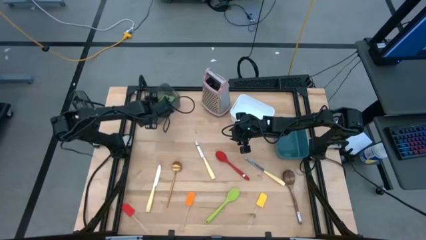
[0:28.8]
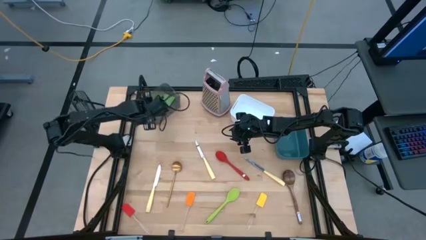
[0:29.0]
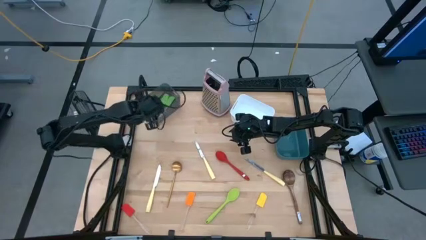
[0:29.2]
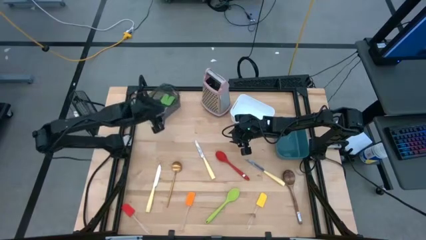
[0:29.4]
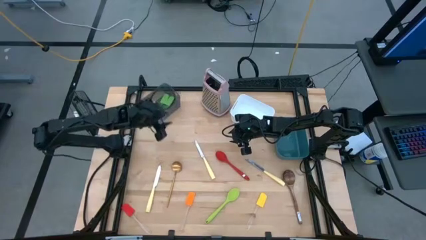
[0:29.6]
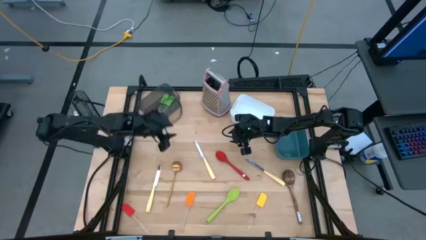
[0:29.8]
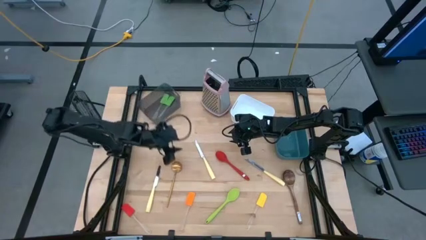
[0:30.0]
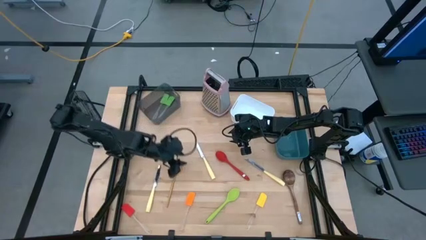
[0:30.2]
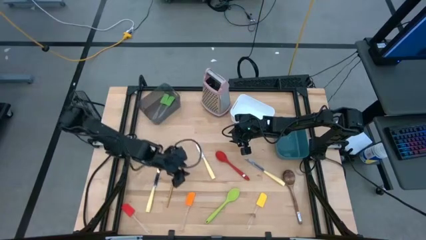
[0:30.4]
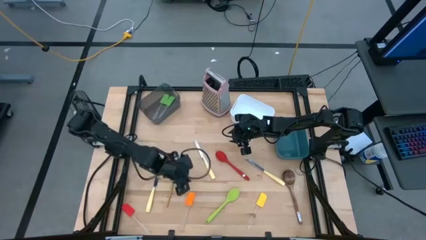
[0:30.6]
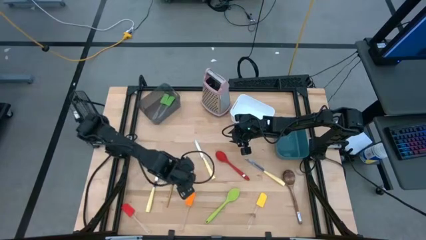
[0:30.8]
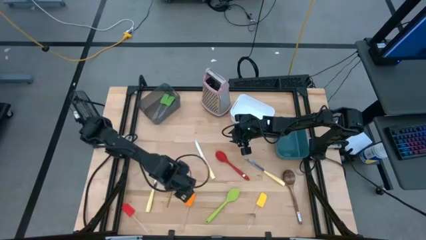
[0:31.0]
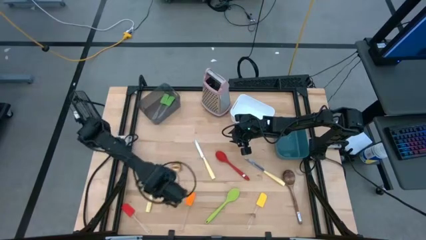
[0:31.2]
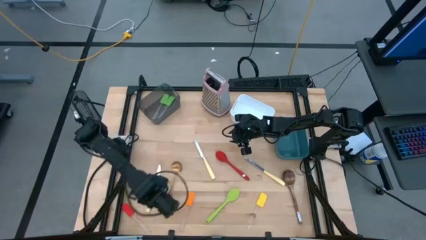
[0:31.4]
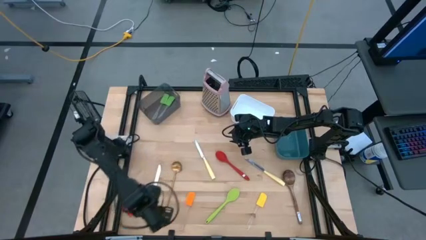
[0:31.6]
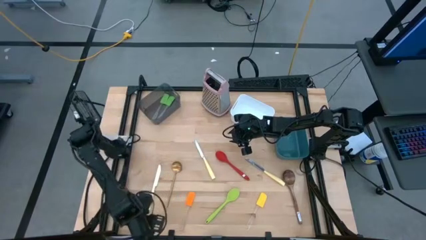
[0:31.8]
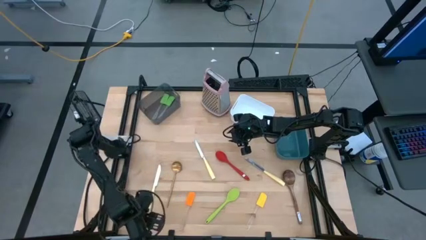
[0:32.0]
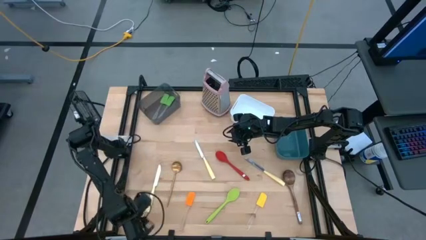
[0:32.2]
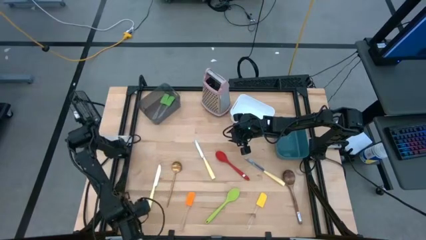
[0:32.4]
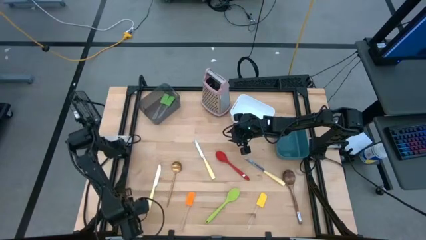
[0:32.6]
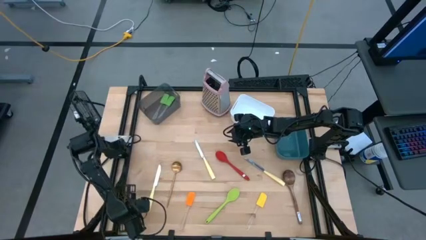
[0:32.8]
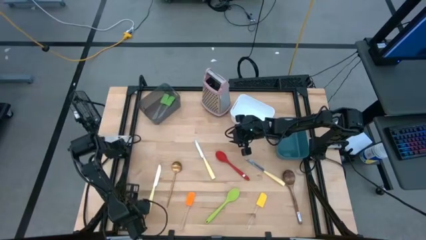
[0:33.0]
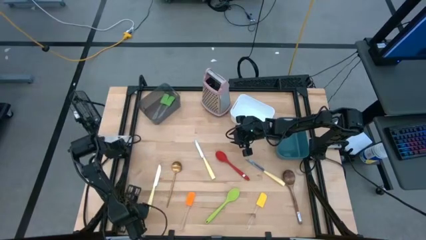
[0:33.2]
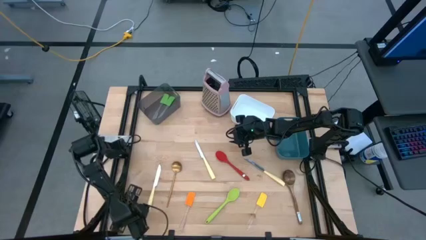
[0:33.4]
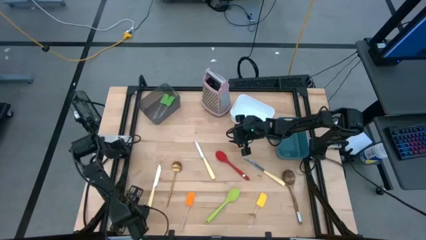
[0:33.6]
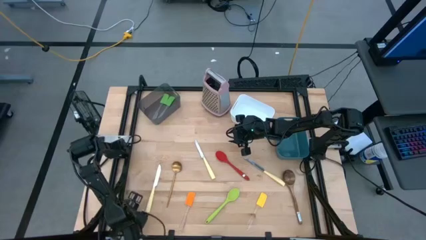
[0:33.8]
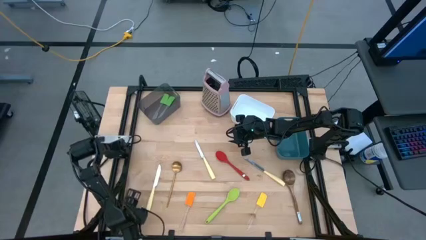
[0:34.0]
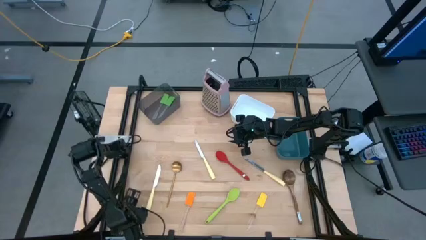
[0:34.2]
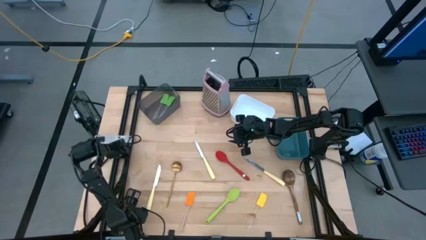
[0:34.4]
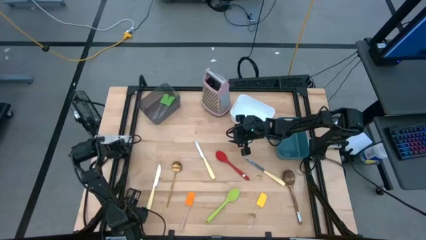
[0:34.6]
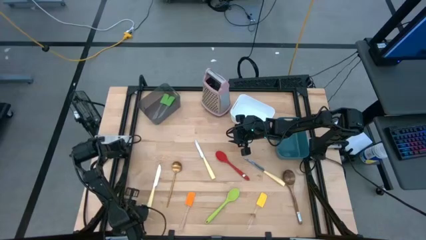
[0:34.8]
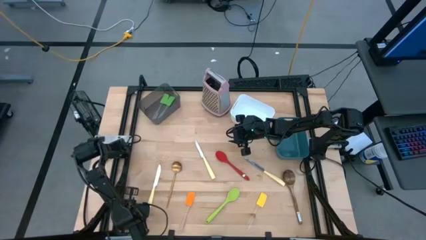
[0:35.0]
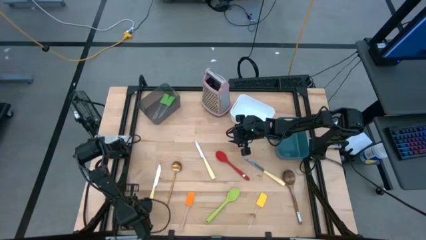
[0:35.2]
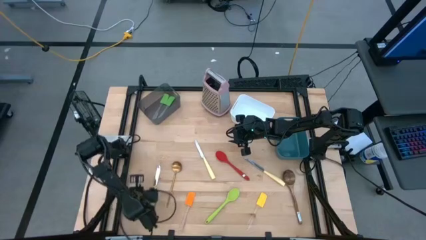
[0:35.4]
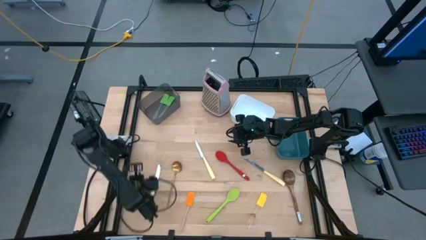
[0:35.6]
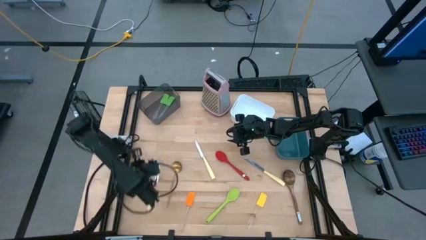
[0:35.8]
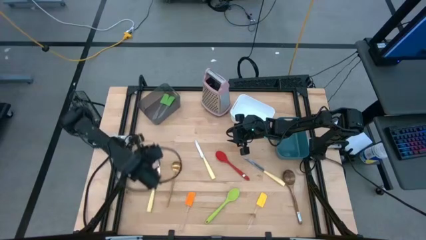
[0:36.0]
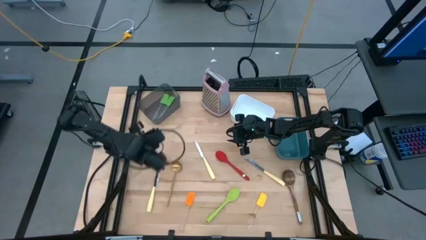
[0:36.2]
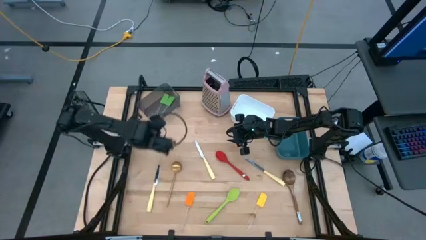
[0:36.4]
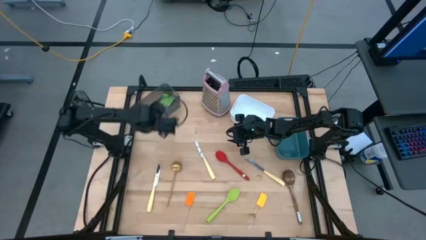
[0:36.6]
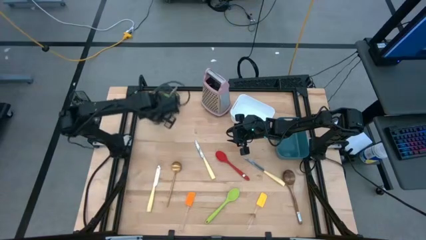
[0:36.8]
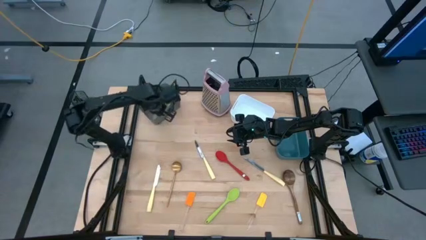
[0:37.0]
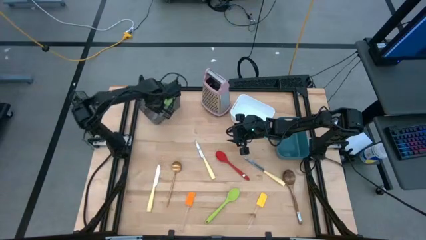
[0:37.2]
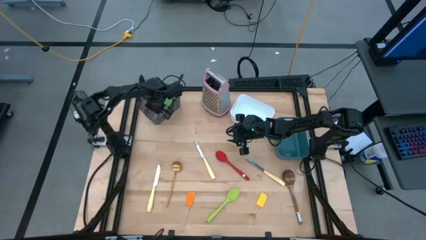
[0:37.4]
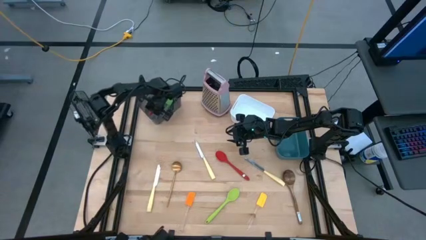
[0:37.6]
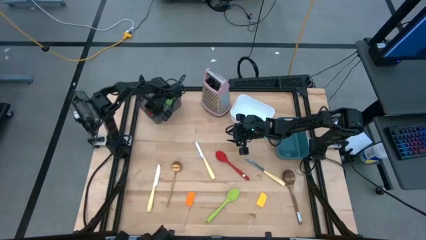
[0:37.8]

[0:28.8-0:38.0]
Task: Pick & Place Kitchen Items
Put the red spatula into the black bin

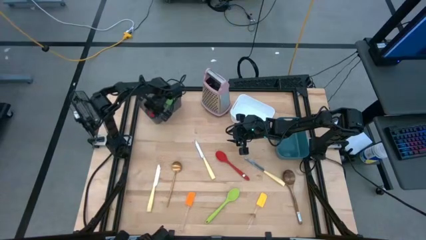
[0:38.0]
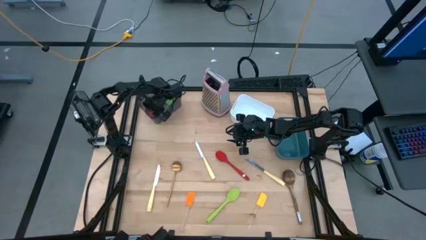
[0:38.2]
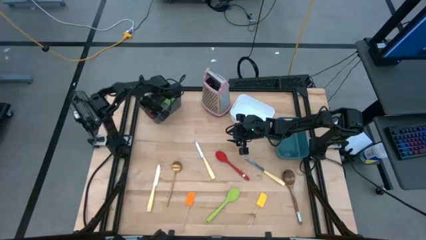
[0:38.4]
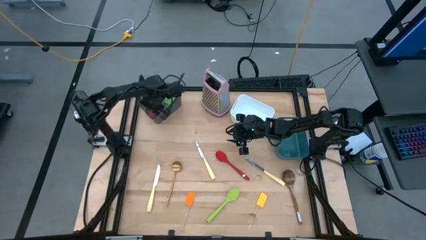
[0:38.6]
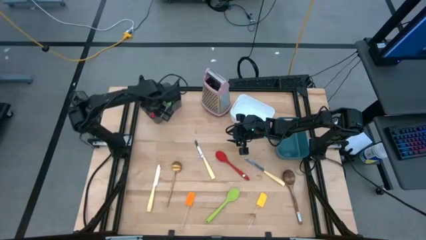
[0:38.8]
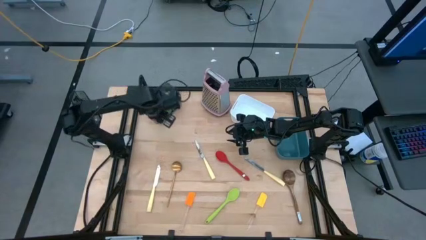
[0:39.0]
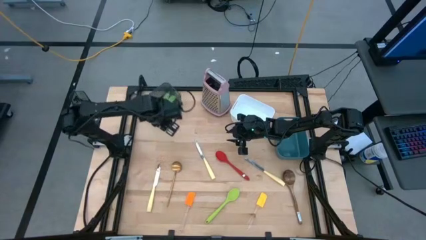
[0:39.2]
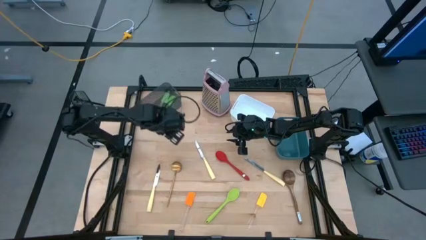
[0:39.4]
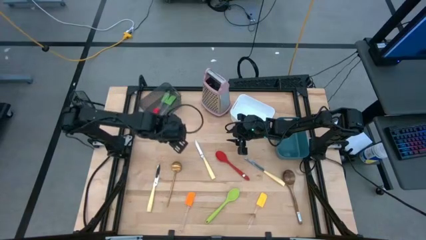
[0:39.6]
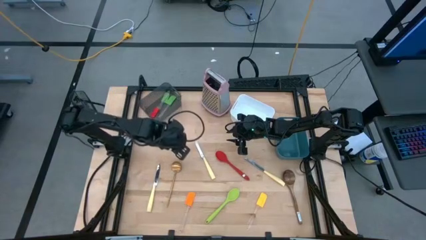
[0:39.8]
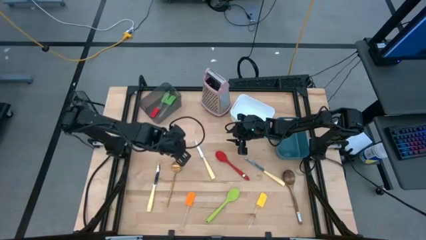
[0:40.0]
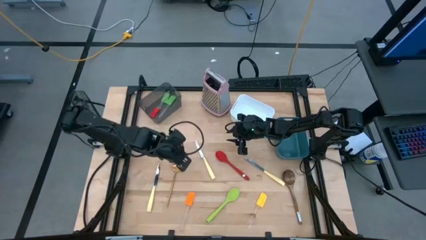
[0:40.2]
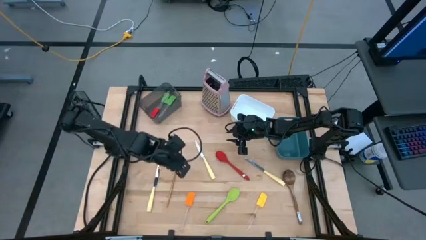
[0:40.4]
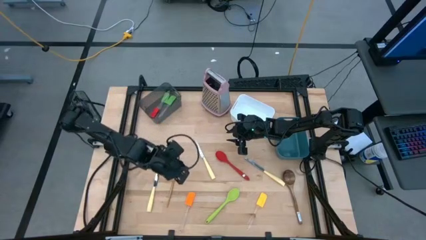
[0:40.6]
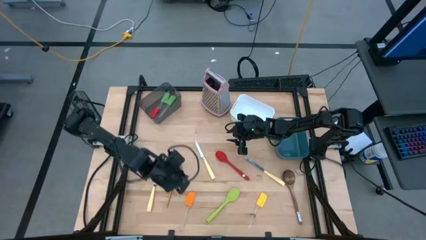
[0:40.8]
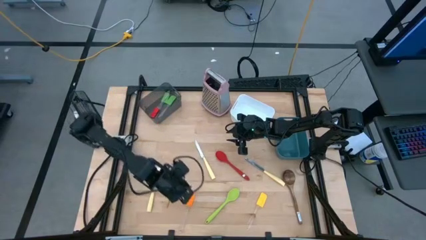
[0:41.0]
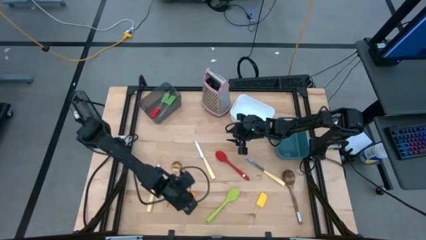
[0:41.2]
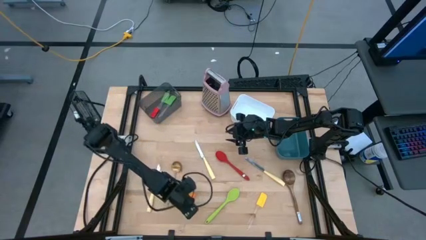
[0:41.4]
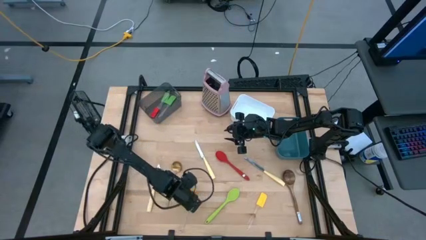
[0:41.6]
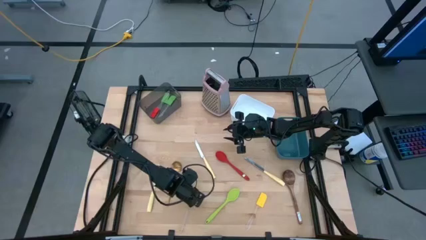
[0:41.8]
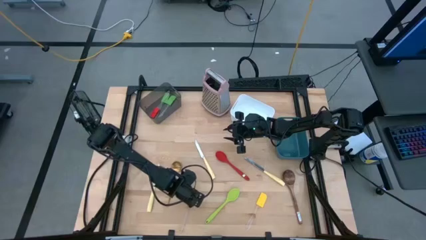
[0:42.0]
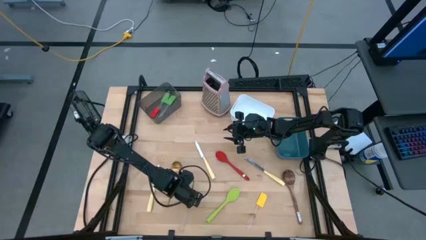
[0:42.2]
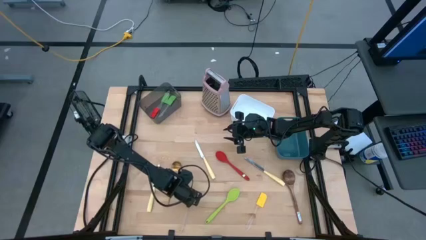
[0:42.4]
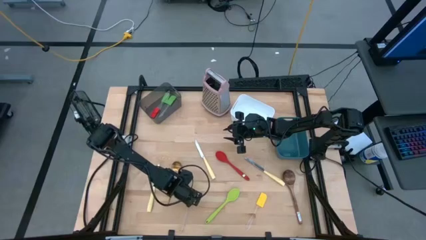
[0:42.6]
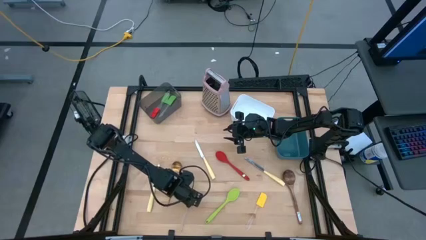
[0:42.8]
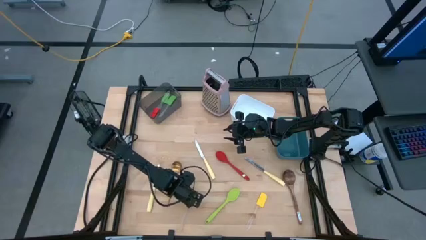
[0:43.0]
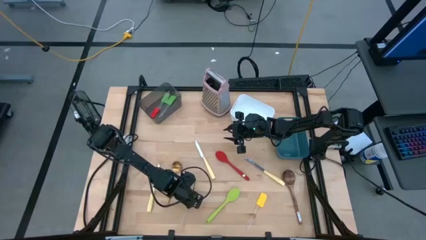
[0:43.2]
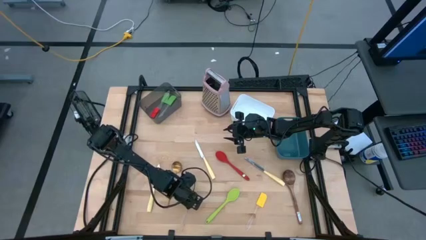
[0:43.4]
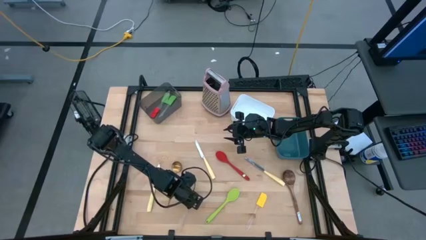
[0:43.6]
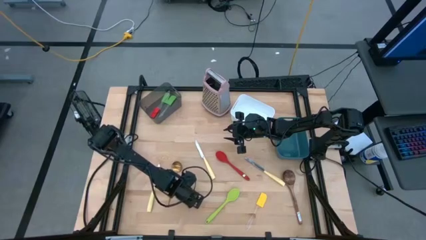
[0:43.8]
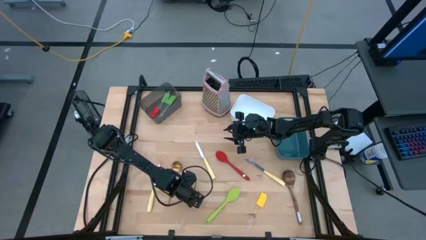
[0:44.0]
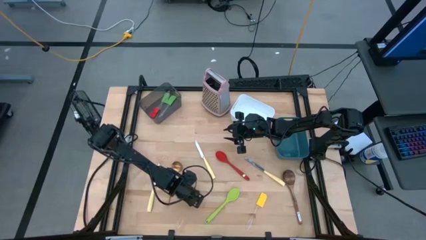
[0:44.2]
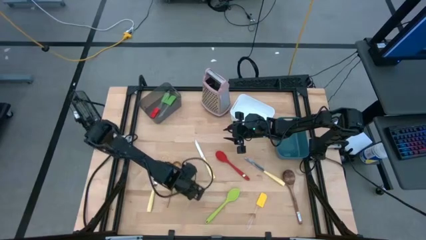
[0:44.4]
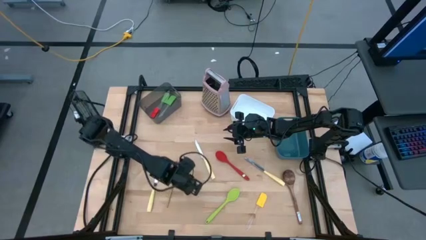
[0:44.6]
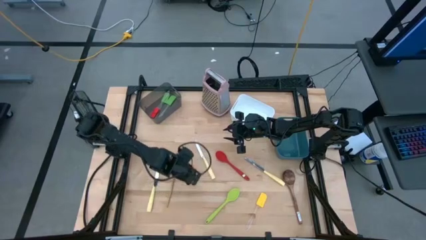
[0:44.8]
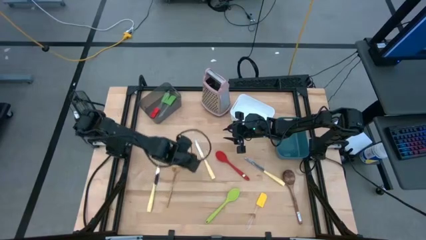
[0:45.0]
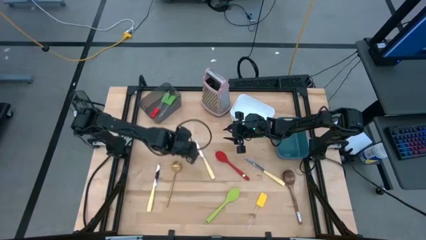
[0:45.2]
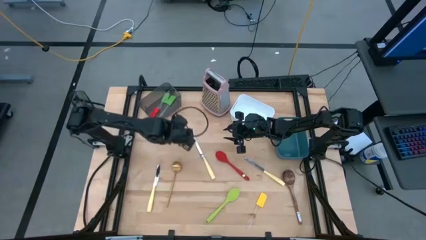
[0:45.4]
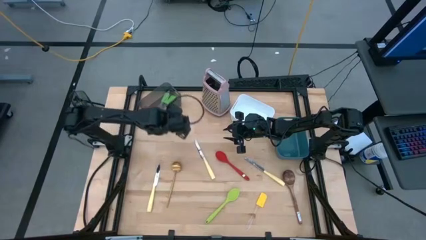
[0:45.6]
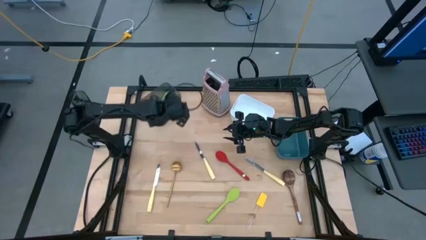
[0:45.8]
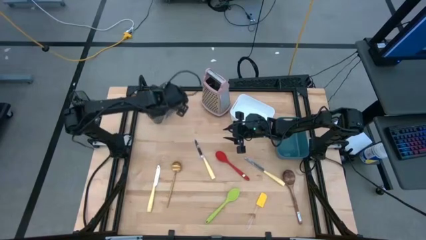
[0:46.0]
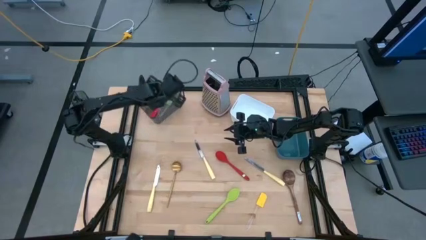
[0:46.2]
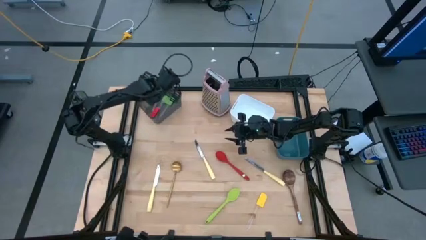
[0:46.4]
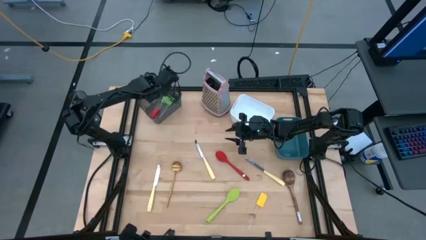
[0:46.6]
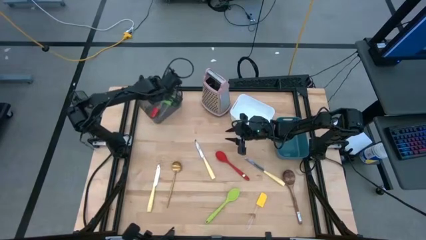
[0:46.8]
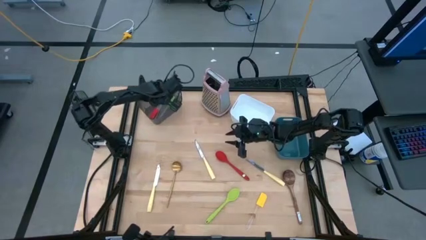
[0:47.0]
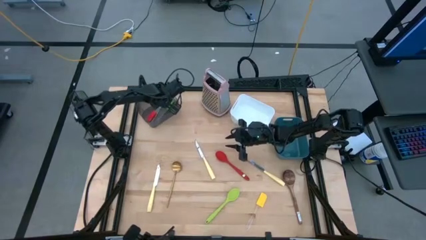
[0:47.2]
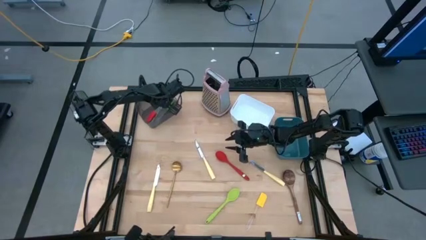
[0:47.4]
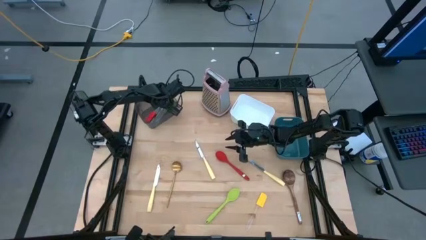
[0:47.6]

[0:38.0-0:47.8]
Put the orange spatula into the black bin
